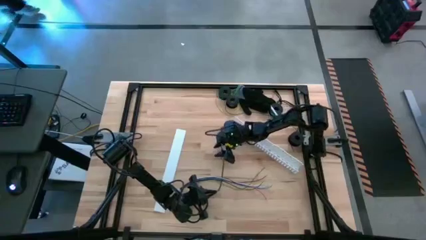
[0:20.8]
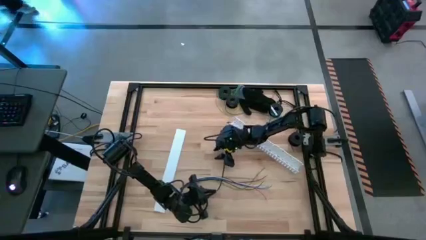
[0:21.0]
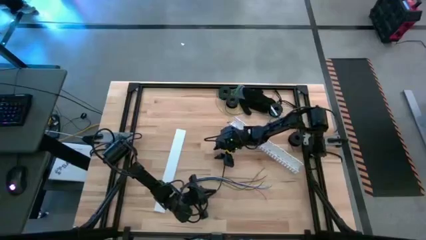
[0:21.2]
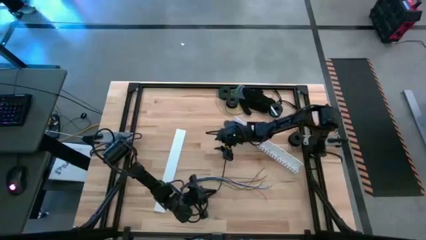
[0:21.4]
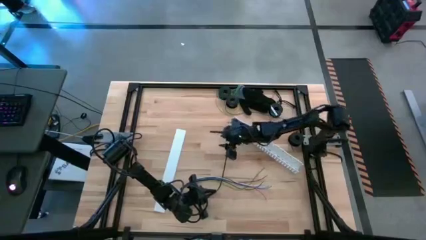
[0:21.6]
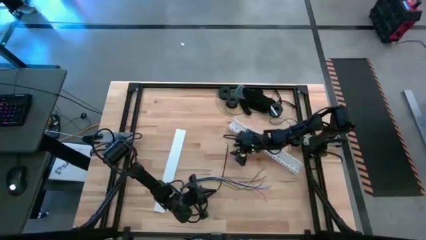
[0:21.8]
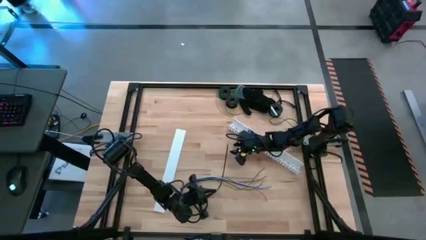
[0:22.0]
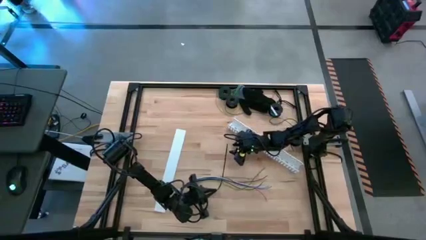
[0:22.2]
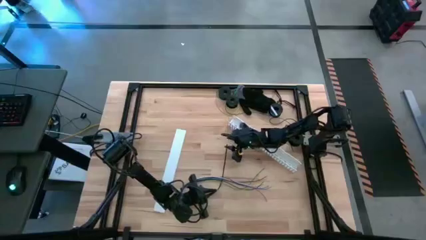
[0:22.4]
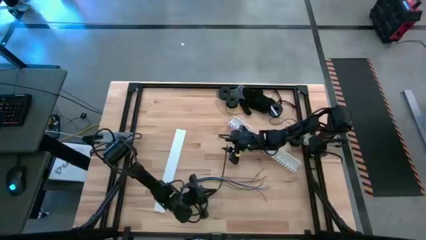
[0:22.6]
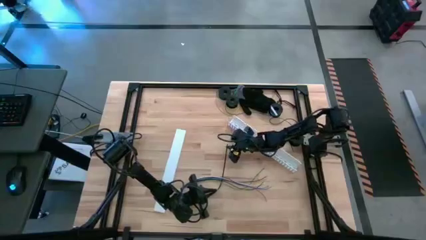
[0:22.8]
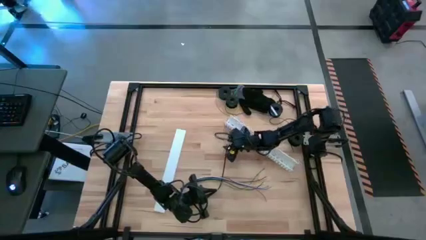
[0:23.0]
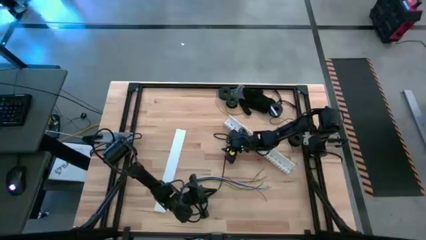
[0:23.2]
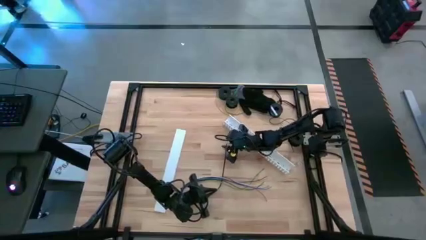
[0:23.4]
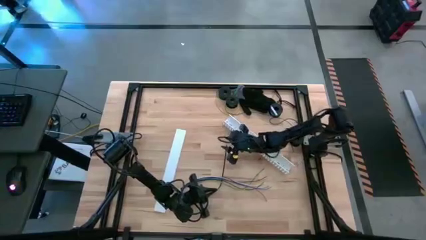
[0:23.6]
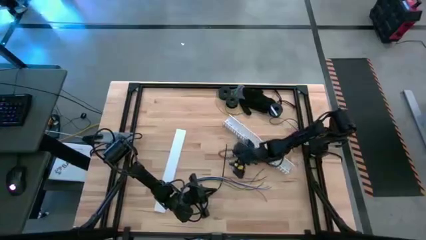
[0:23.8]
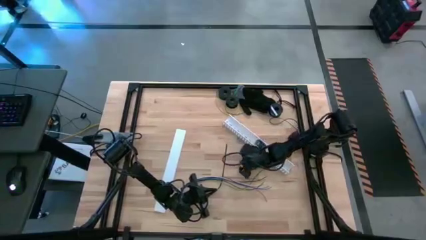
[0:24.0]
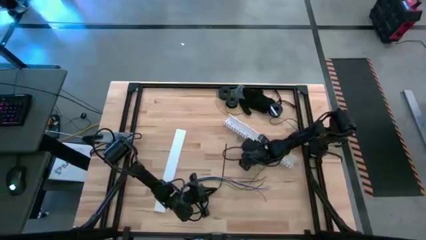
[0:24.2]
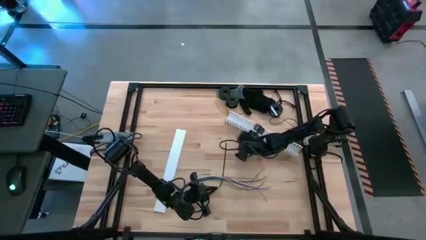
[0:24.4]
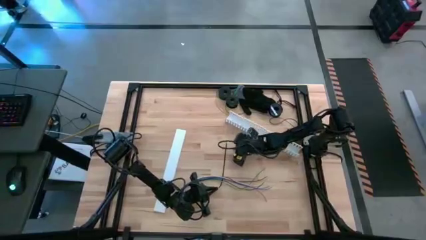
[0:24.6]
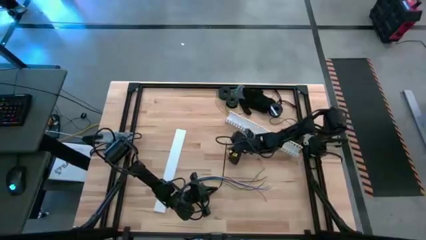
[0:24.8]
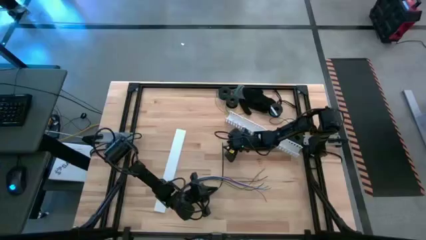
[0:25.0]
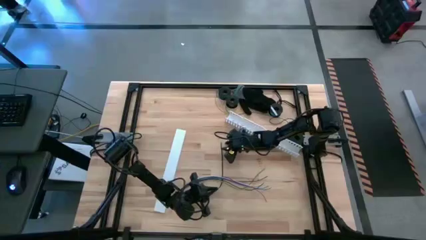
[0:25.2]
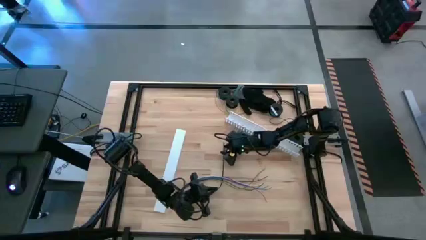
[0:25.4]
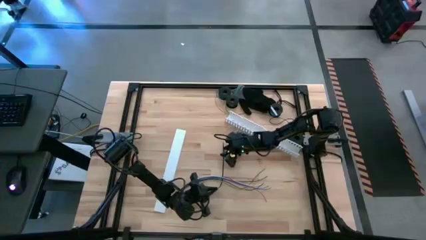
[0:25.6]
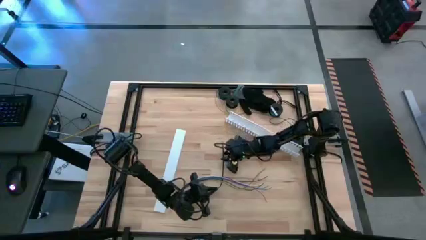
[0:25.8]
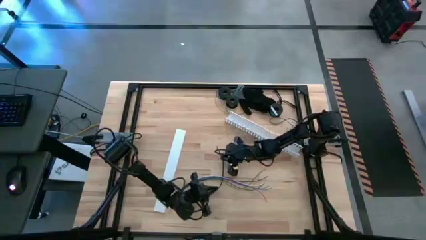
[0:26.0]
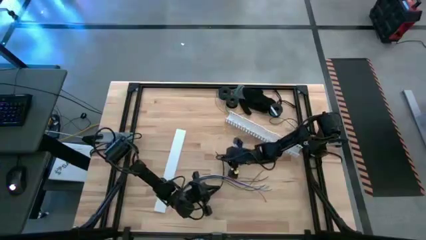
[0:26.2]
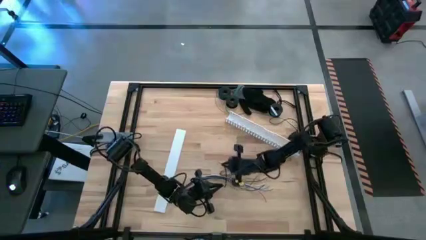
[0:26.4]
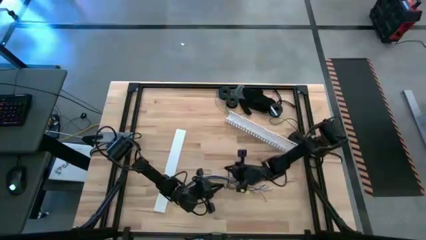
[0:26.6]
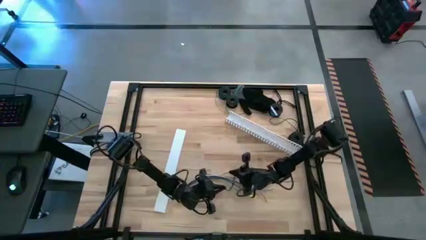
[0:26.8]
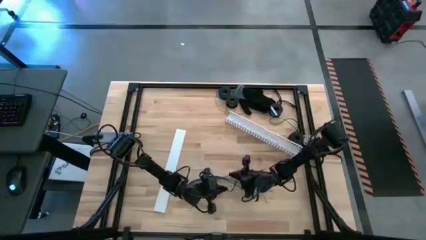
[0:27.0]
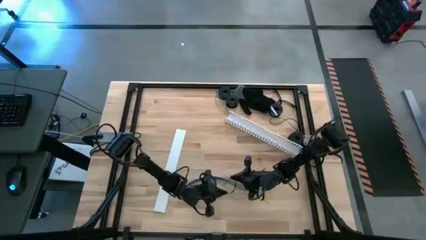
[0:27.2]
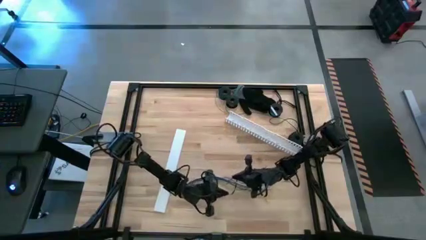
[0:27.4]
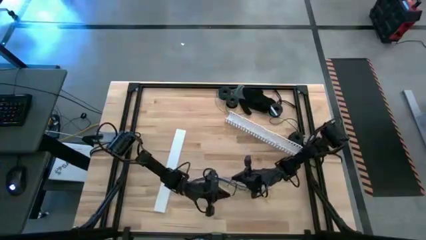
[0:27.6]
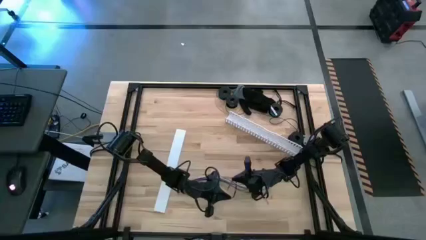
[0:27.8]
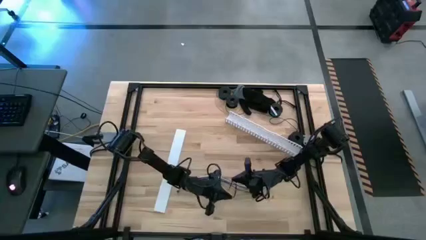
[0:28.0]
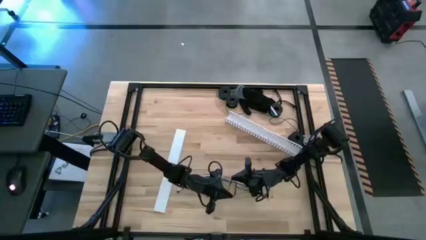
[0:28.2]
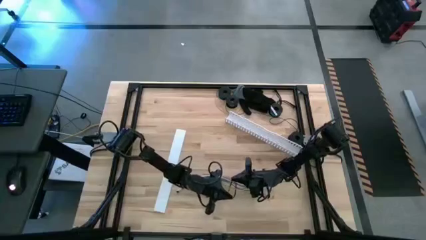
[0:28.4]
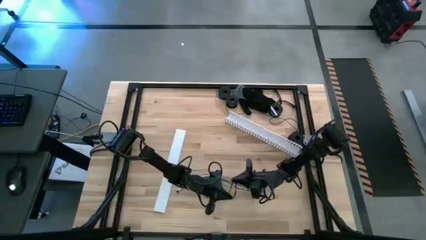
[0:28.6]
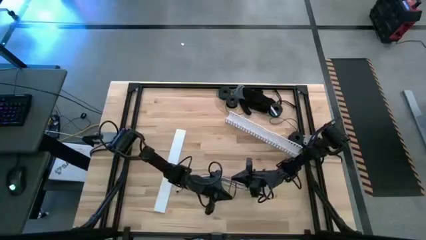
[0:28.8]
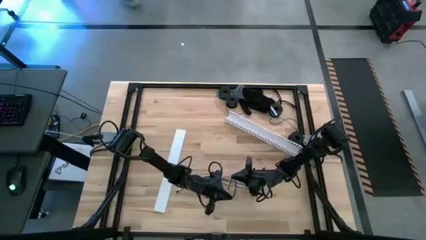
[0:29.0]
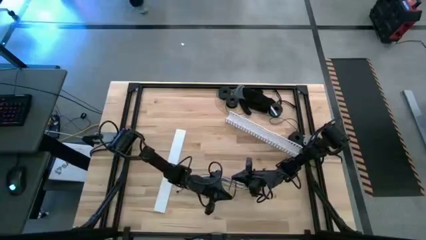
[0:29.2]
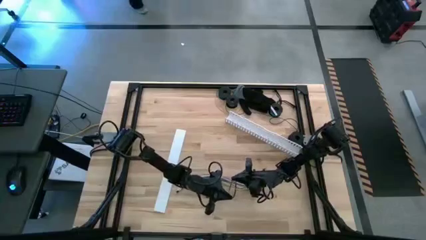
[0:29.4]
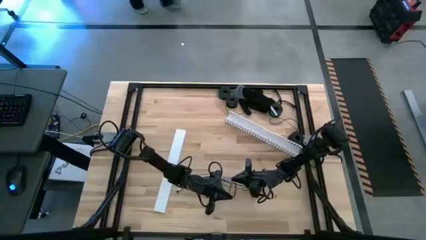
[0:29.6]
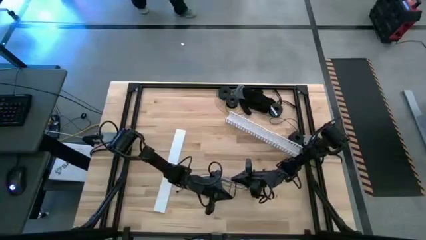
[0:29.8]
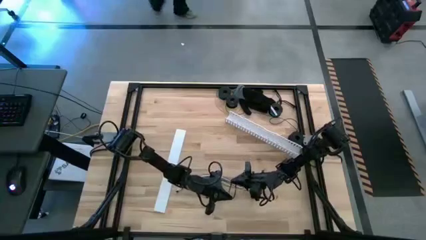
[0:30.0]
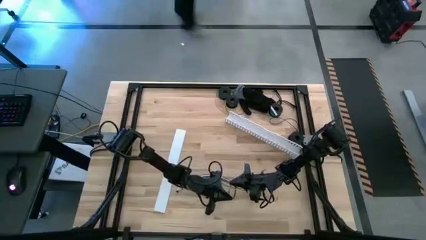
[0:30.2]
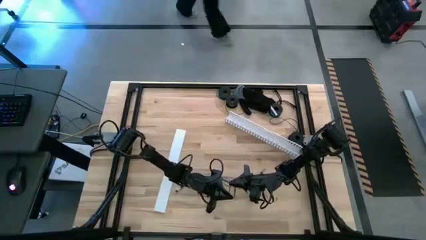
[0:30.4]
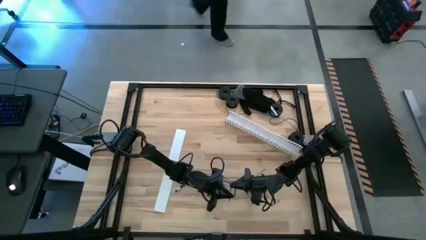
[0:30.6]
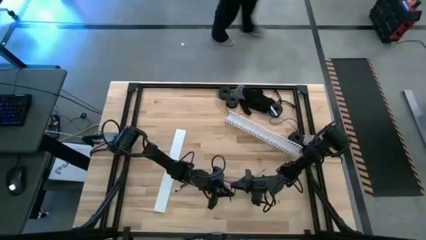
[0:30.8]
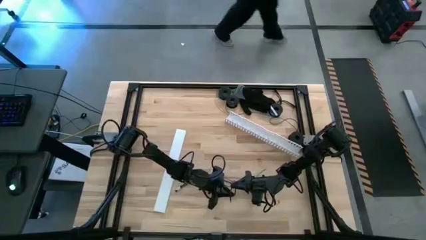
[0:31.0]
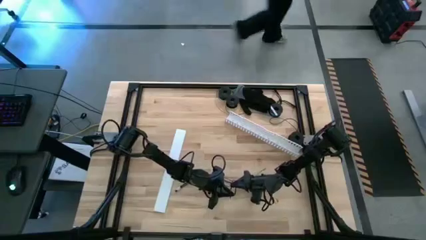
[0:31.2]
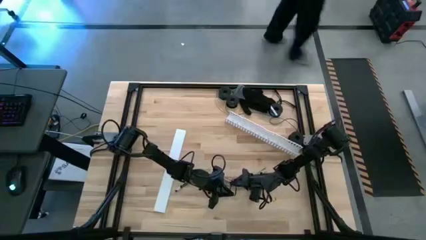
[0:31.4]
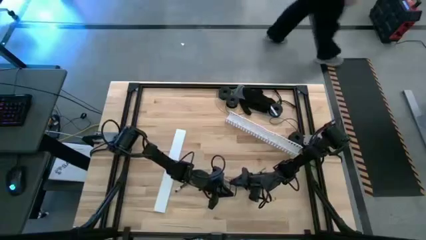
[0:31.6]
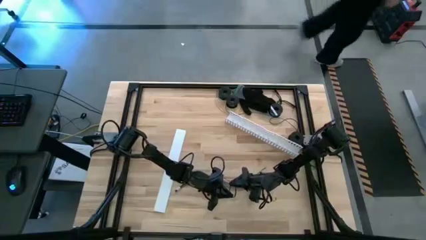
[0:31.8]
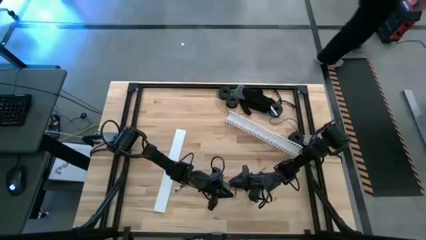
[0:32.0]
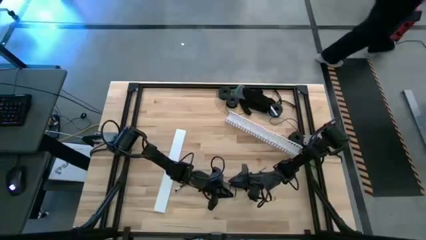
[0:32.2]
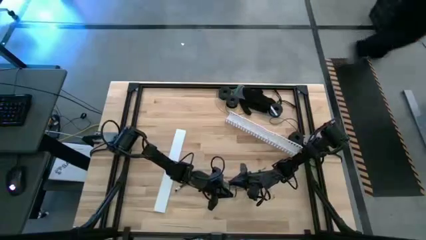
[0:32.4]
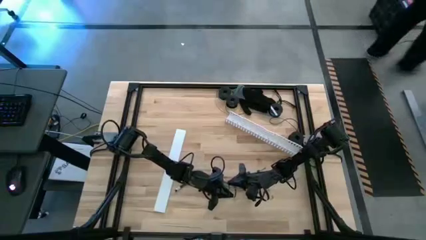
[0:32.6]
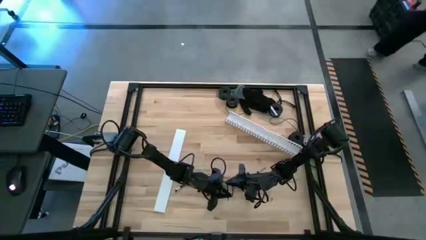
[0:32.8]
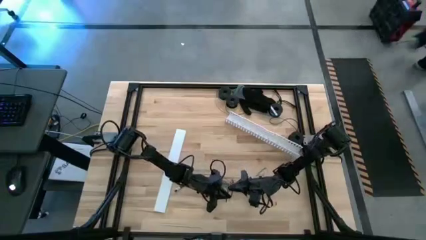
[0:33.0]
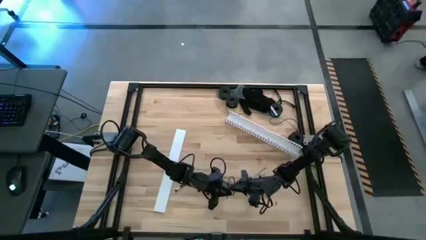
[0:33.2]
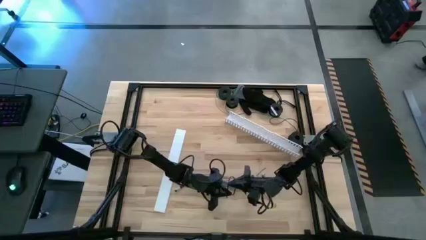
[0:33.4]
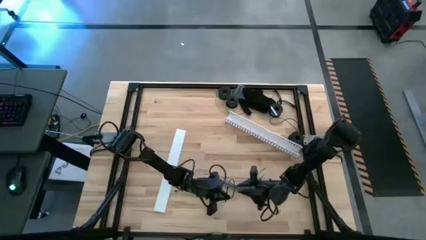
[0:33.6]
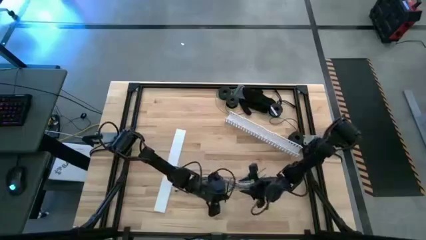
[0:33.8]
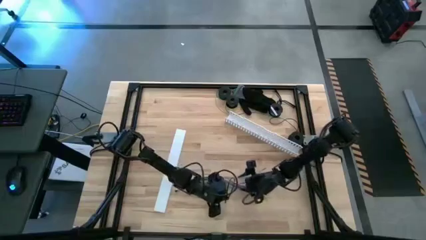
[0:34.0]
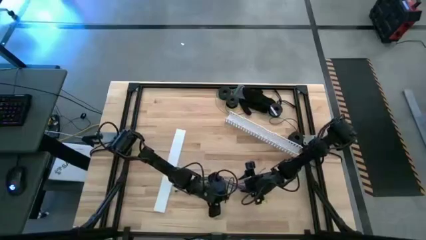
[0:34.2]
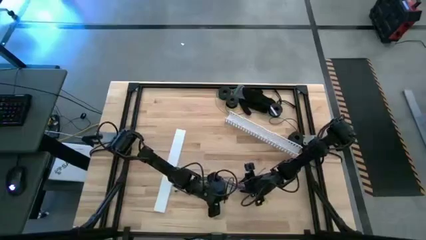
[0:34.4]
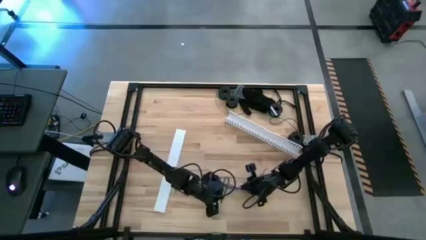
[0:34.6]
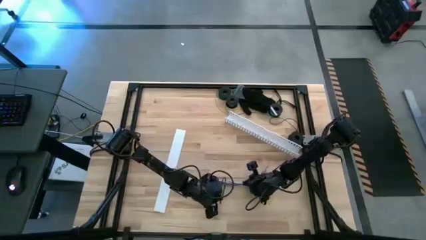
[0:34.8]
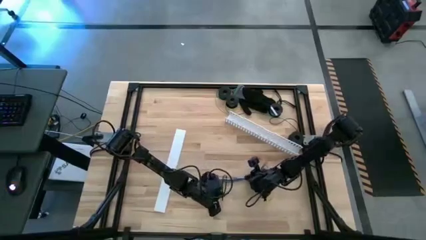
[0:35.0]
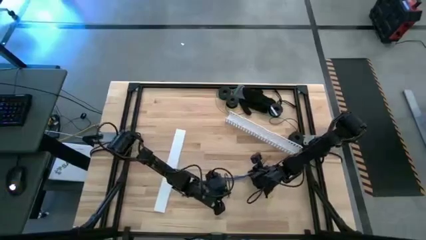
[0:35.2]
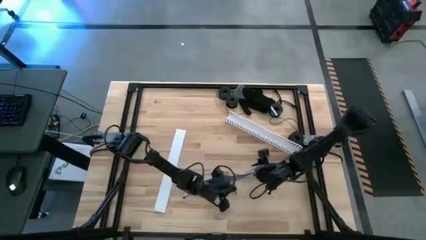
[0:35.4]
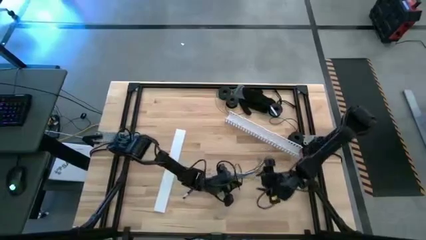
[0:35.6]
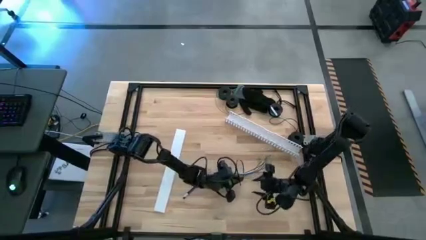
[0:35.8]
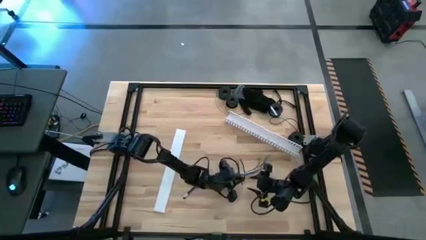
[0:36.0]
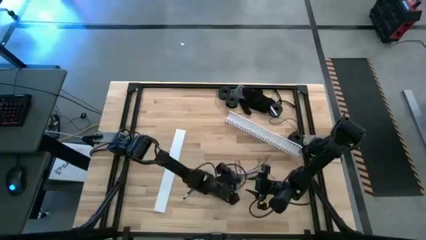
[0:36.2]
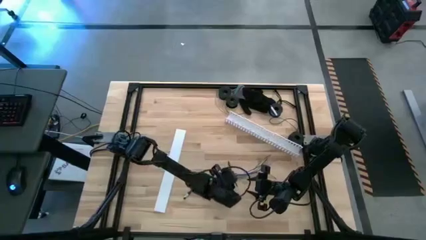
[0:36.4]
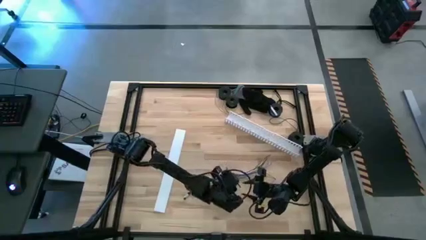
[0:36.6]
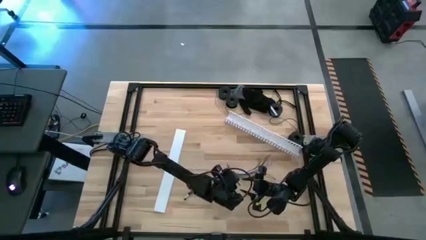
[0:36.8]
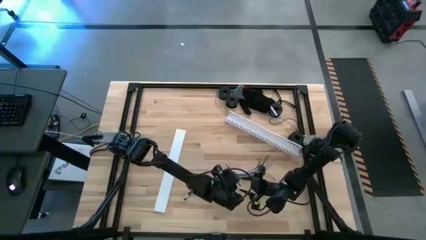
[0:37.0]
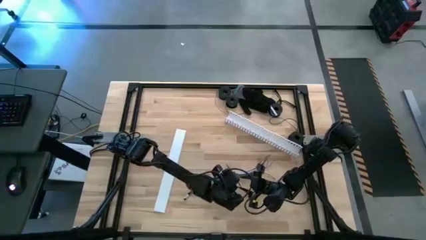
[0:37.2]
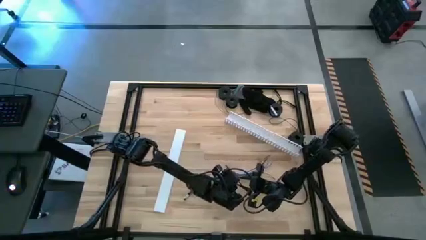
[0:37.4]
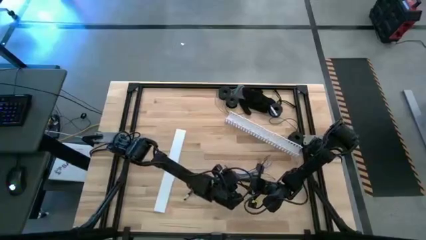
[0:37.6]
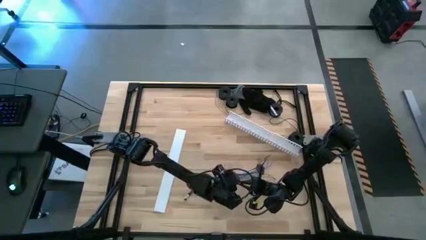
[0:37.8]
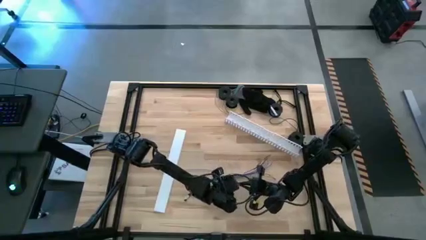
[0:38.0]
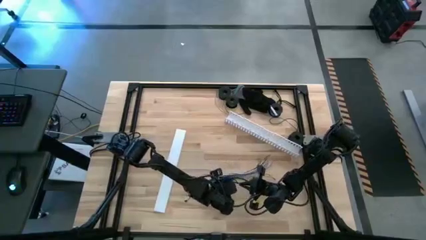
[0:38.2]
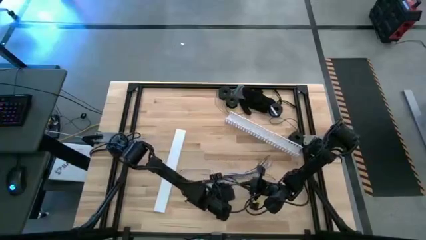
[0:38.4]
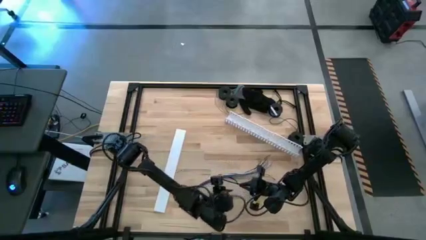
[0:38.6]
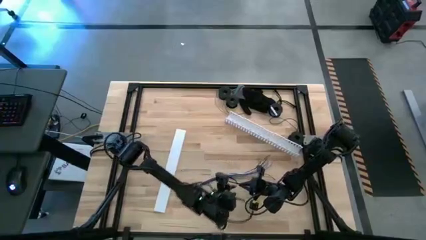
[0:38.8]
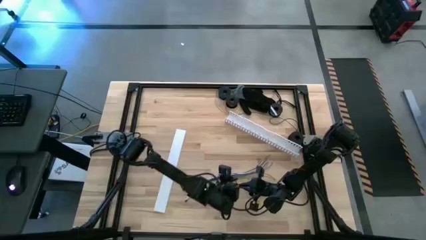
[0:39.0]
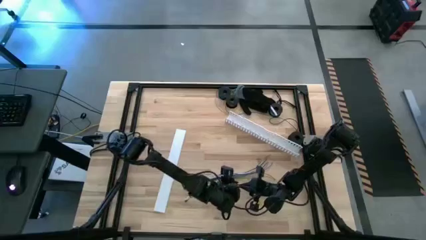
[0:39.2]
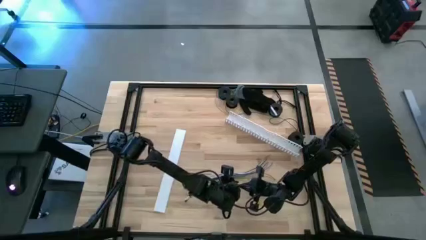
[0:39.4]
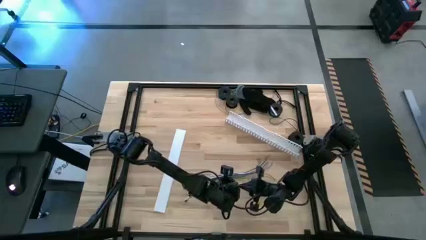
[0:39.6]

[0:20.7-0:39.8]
Task: Ziptie cables
Wrap the cable using zip tie
